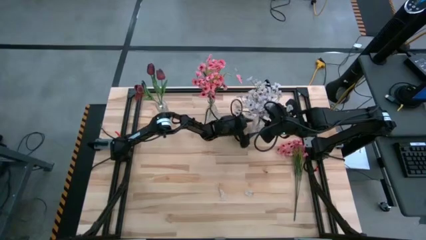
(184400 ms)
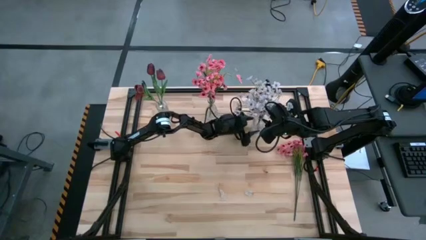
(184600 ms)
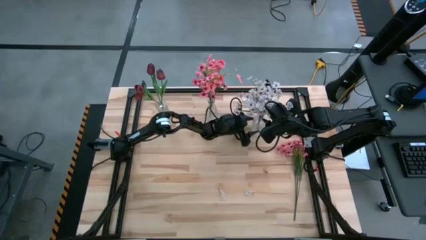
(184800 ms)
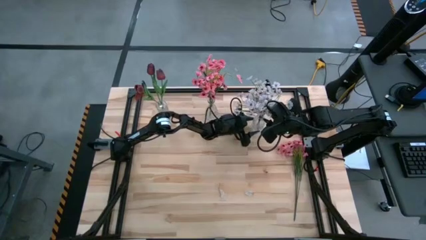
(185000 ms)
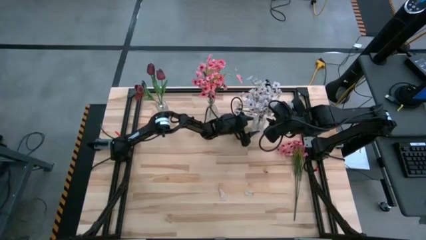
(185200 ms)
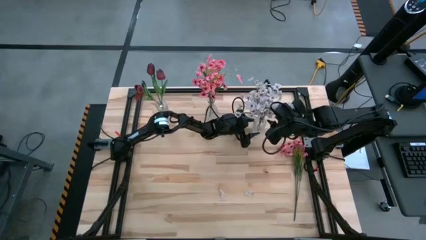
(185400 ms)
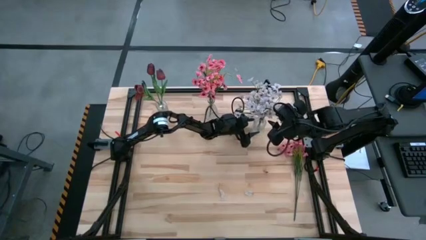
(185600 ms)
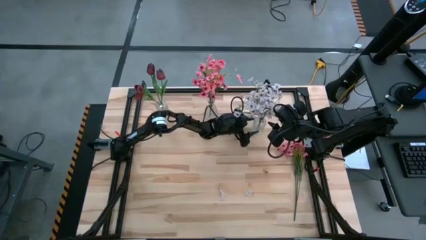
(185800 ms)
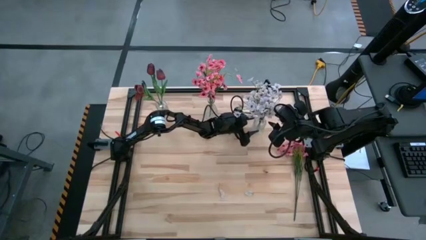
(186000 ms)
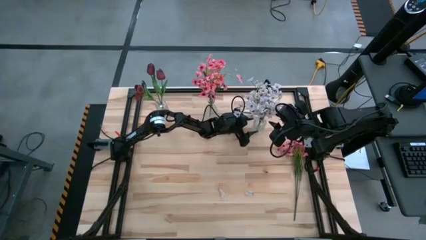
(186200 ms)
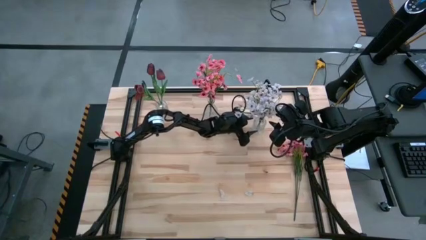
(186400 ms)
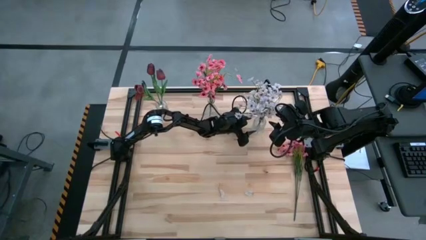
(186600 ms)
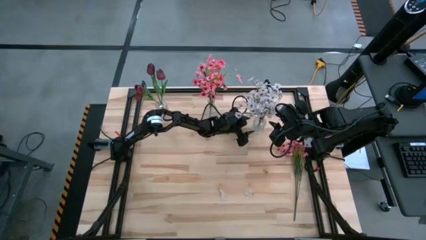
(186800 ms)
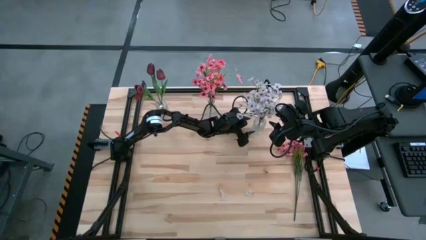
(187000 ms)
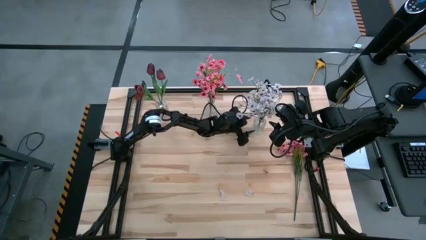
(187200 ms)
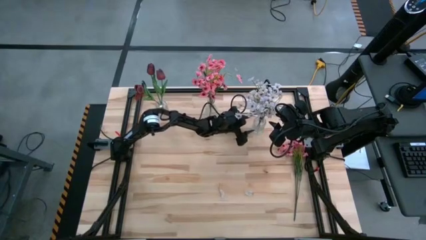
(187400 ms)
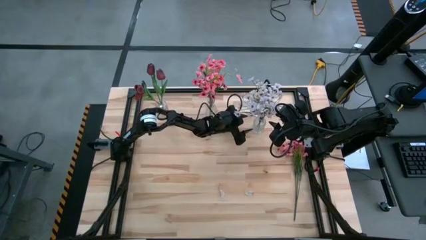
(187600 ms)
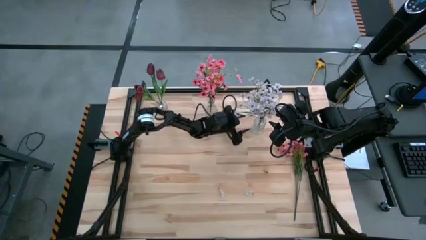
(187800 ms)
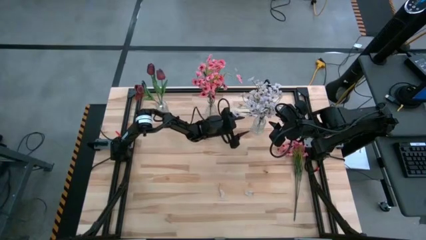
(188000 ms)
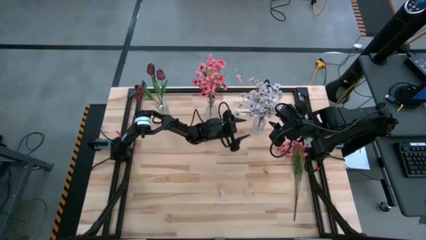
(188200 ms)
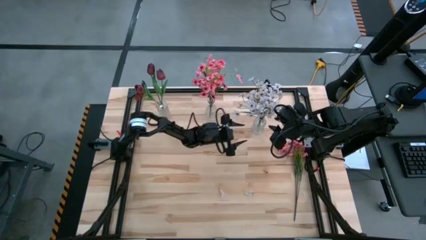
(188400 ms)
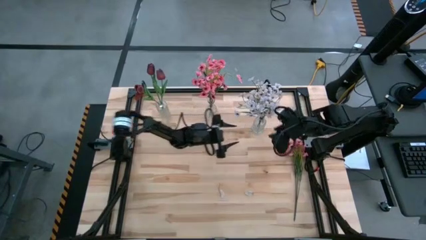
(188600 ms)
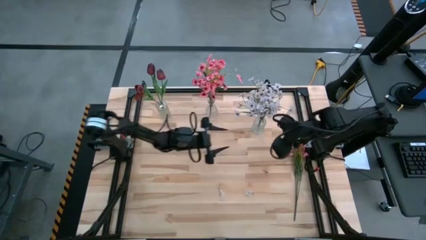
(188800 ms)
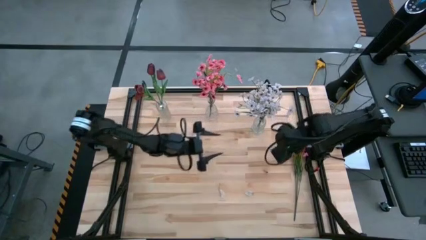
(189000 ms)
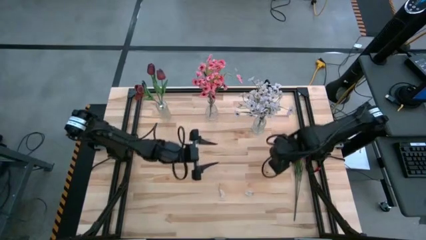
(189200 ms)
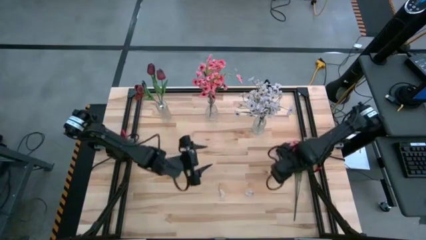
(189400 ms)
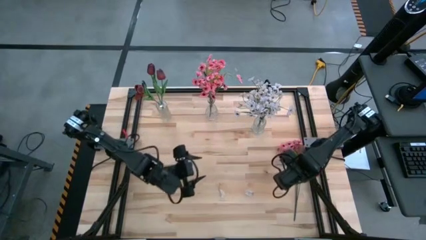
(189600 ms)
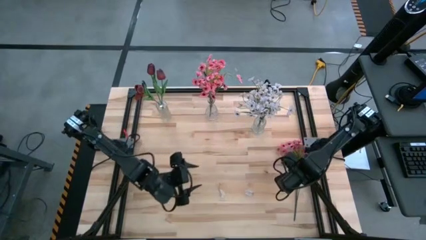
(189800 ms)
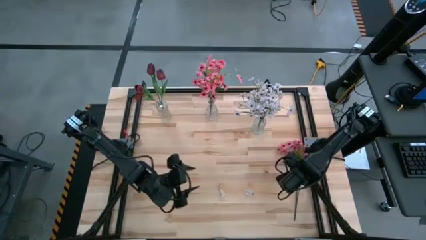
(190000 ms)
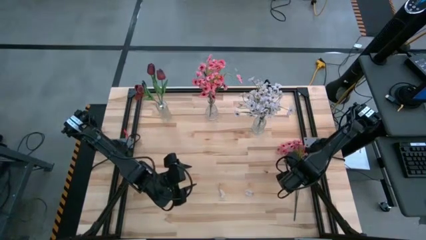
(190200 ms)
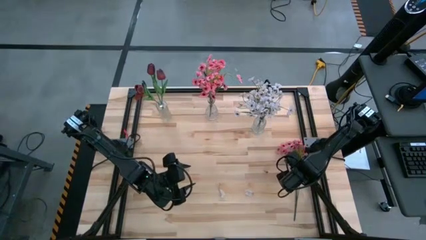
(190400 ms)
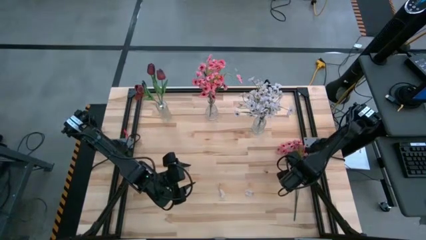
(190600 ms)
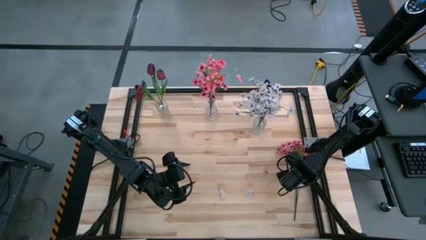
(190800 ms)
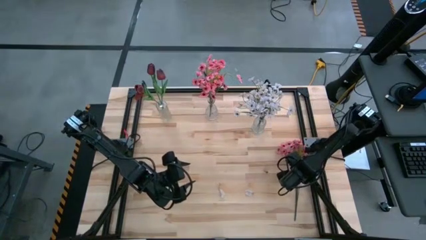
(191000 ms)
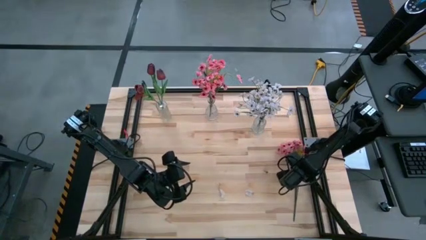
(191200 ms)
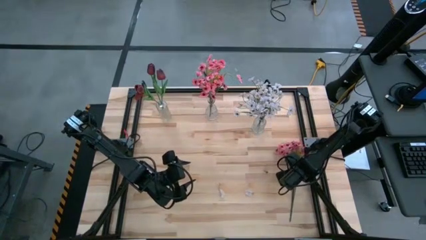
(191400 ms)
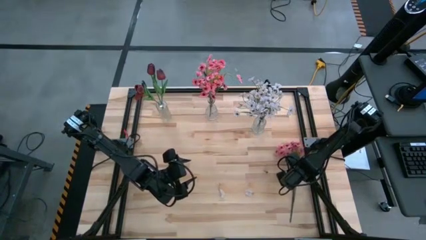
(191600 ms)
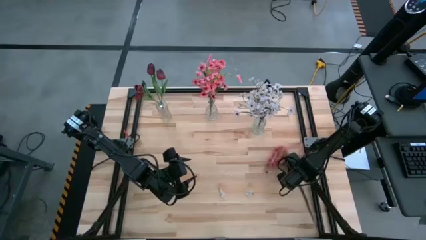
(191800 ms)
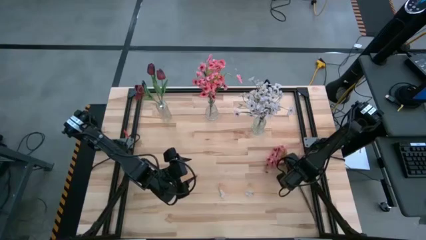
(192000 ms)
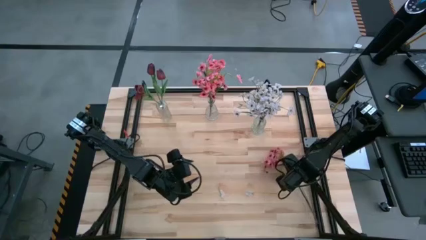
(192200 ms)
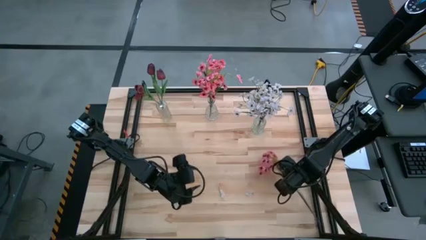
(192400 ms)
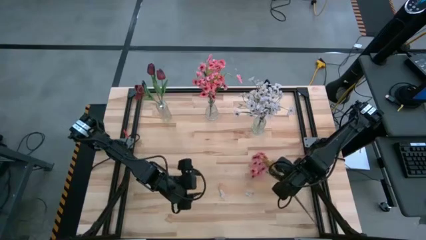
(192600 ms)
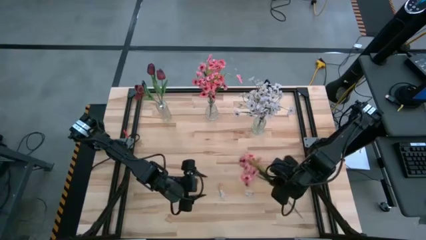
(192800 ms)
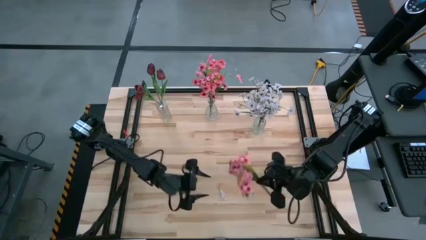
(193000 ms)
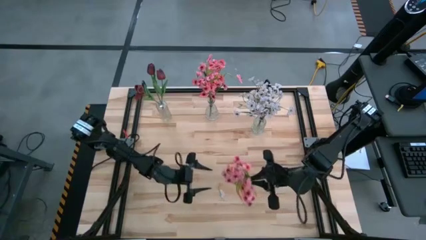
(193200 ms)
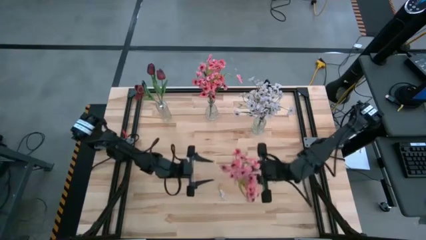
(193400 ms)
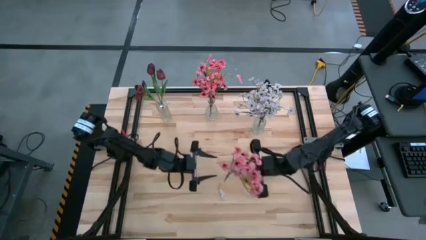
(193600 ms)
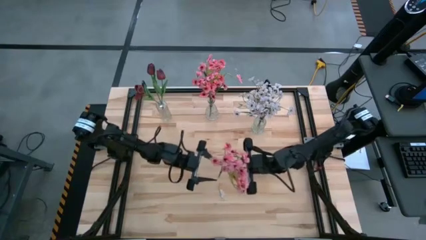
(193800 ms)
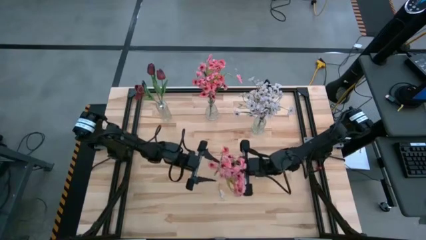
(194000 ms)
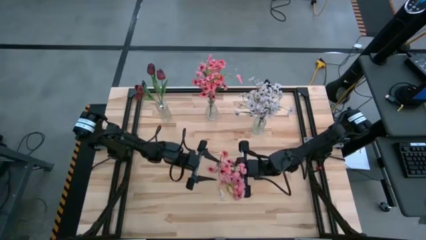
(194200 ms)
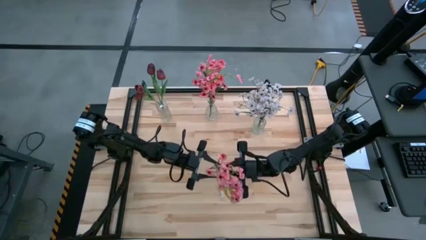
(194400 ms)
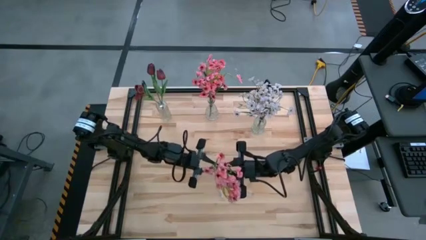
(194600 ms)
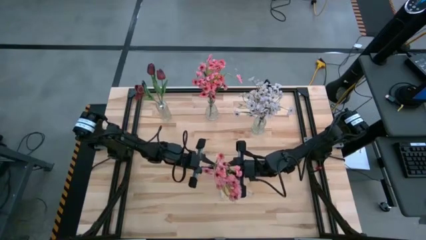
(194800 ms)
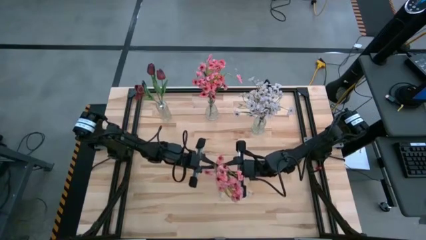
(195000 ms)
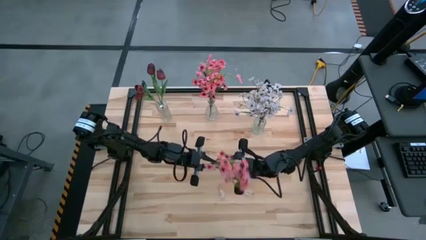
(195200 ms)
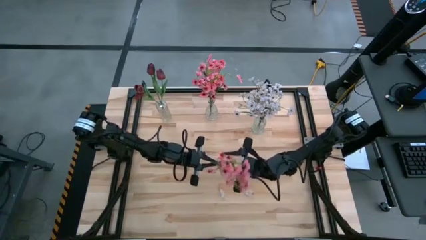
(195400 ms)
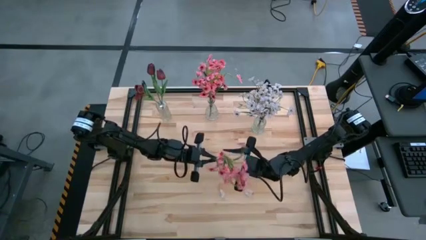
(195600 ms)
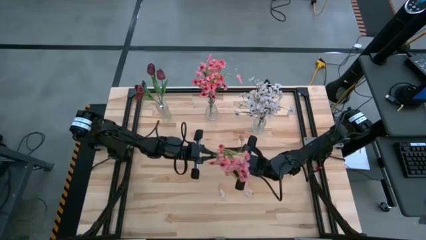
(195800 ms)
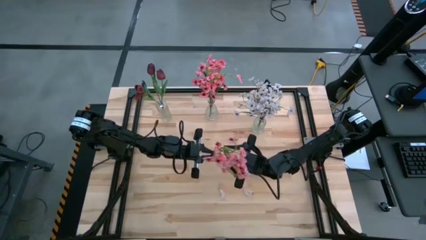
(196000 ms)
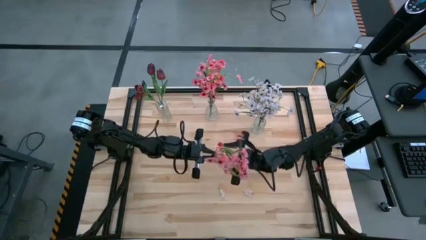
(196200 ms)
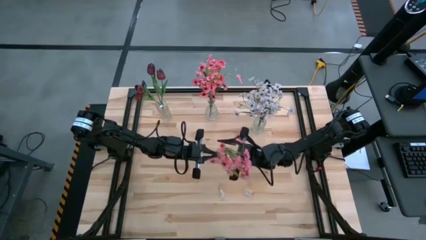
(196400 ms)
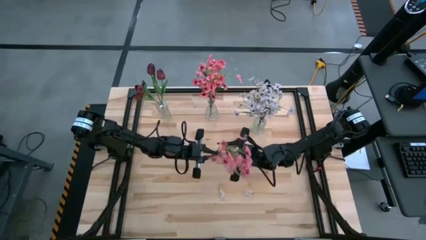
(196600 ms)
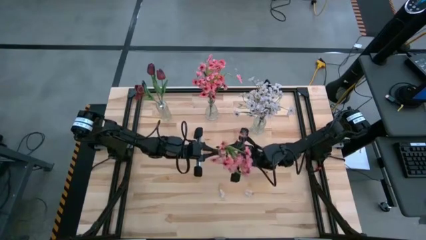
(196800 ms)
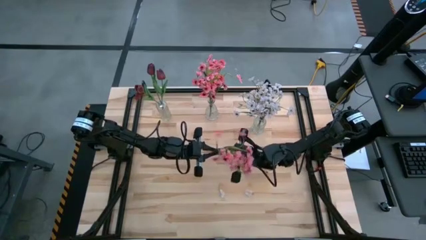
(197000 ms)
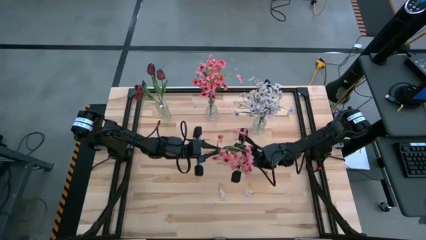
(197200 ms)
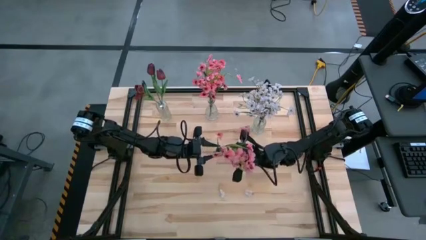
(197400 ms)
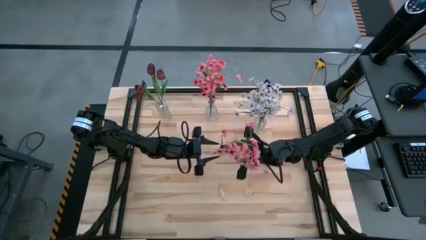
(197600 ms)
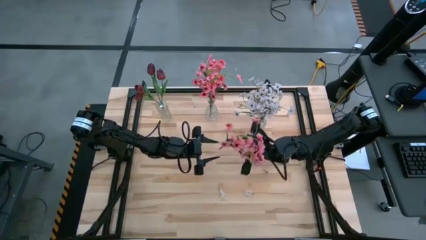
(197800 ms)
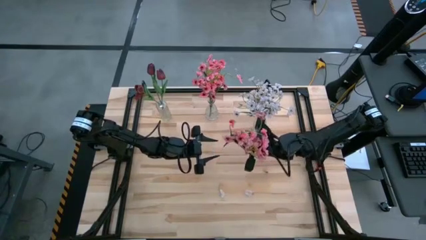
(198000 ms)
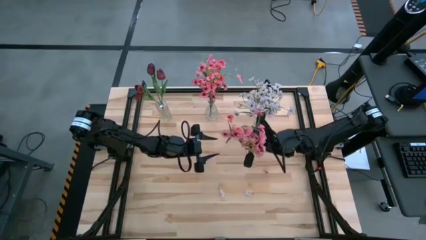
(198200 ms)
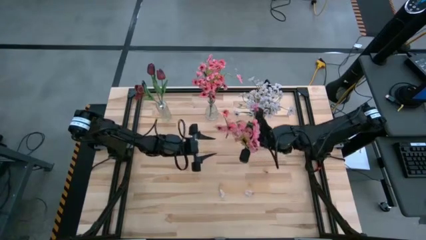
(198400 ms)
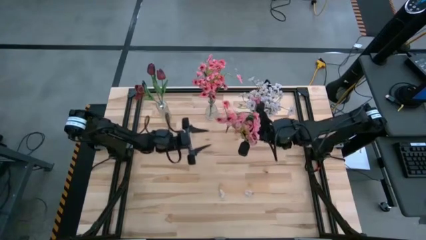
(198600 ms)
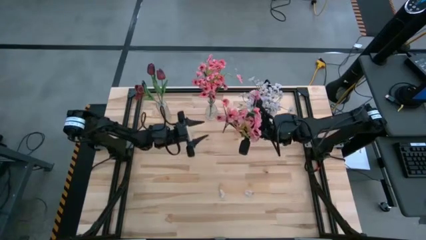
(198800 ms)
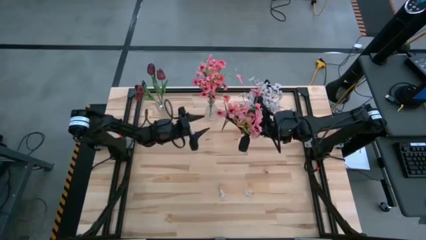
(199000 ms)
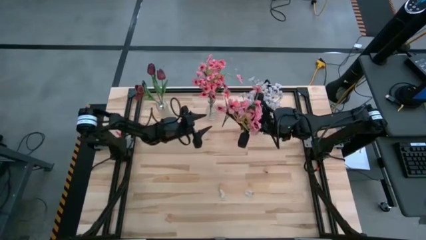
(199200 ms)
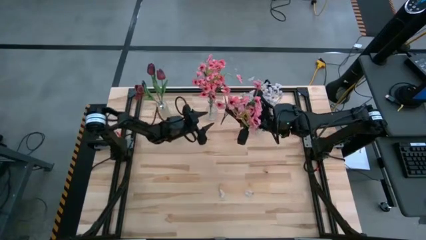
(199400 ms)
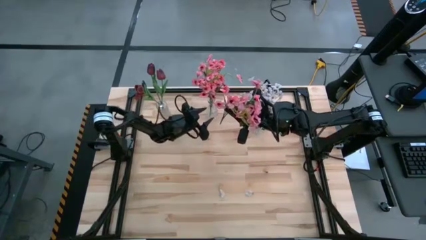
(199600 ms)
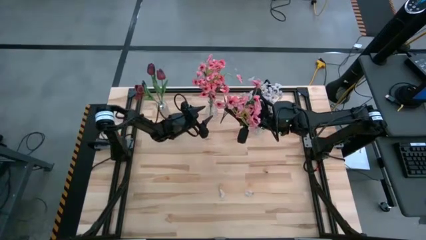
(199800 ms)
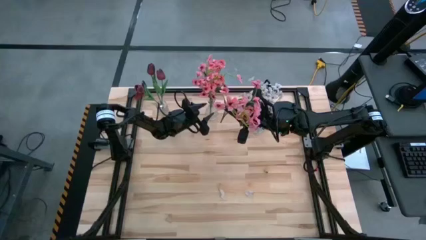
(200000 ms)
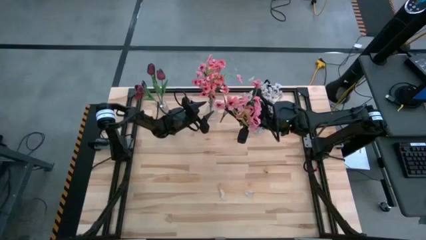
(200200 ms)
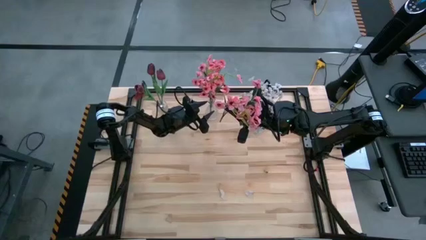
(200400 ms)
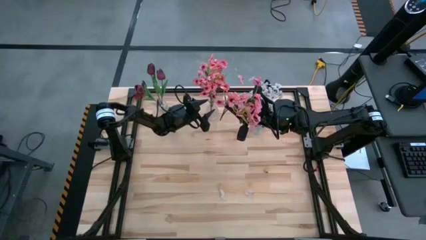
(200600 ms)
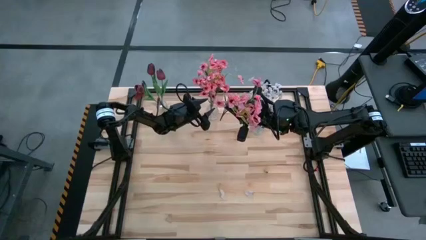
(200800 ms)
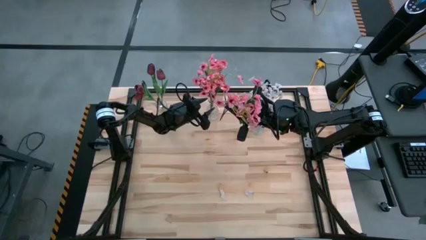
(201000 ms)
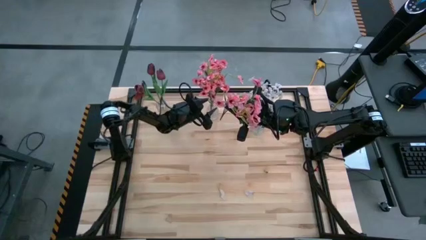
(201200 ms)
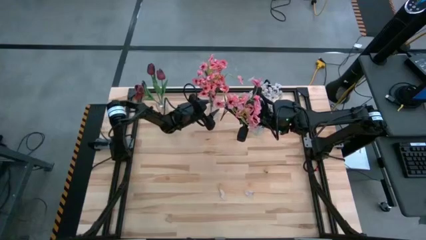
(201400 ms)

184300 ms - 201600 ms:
Task: Sort flowers into vase by color
Put the pink flowers into the middle transparent vase
